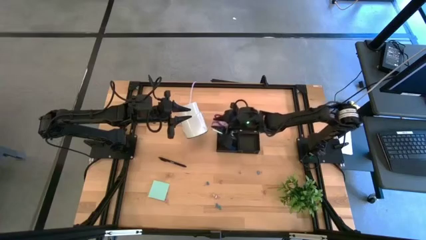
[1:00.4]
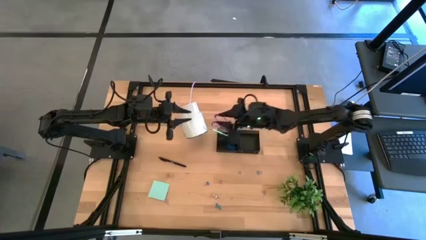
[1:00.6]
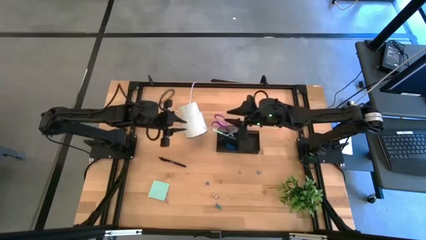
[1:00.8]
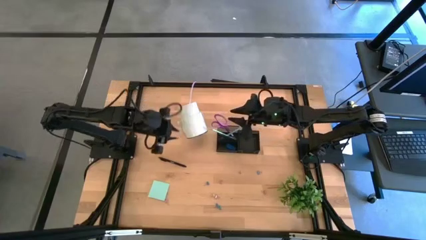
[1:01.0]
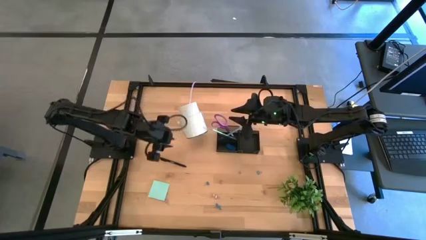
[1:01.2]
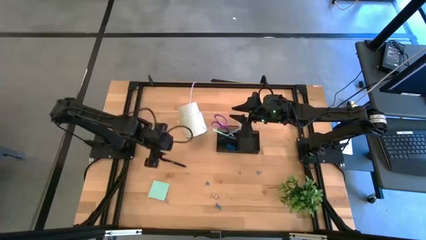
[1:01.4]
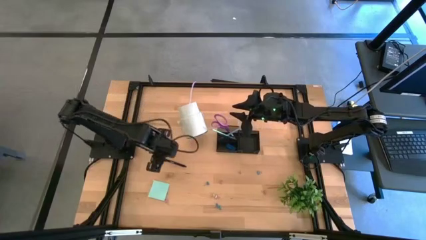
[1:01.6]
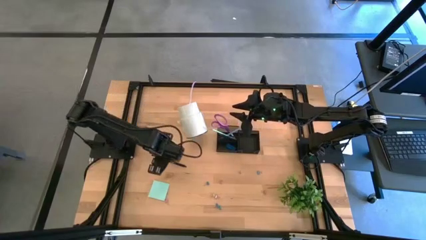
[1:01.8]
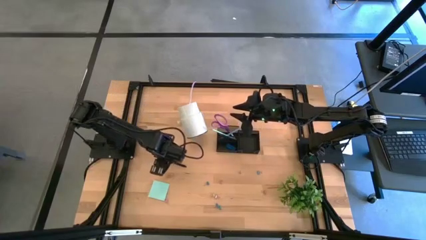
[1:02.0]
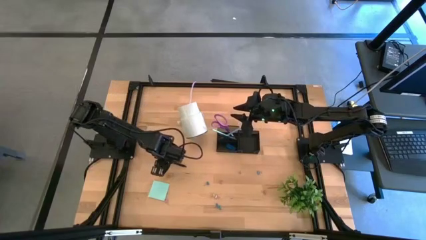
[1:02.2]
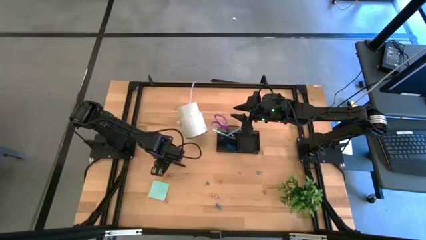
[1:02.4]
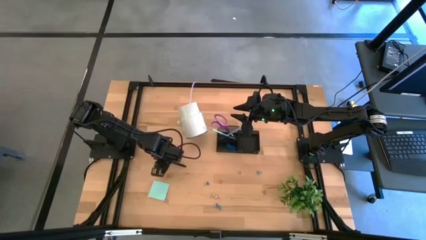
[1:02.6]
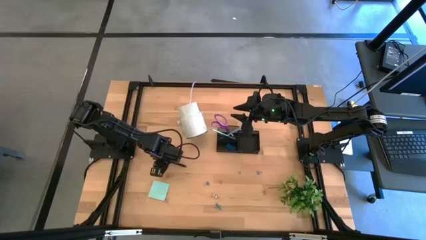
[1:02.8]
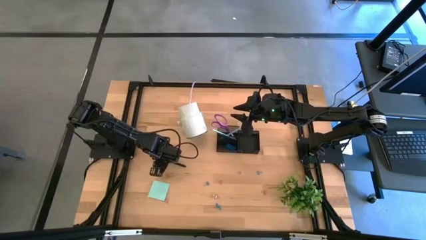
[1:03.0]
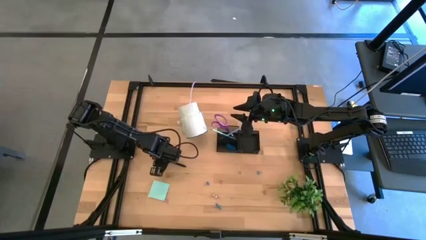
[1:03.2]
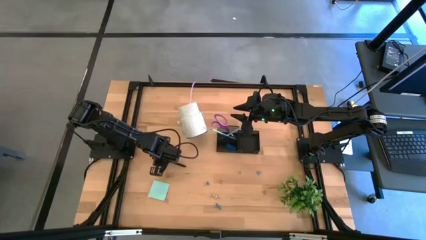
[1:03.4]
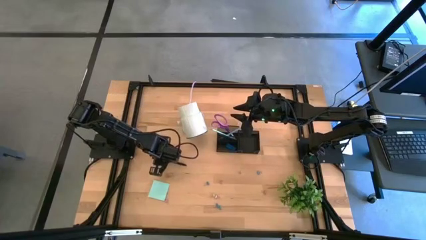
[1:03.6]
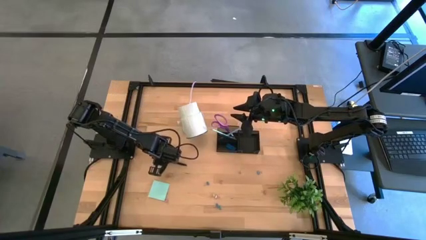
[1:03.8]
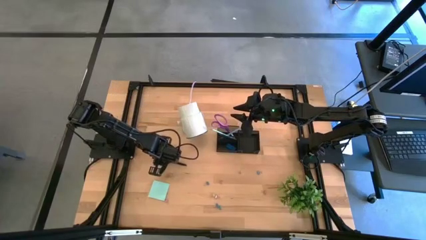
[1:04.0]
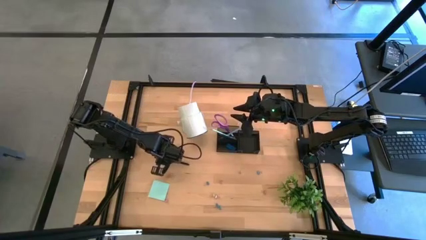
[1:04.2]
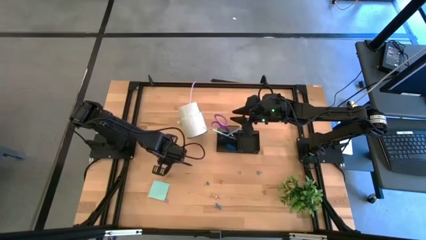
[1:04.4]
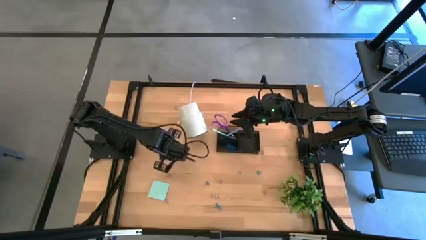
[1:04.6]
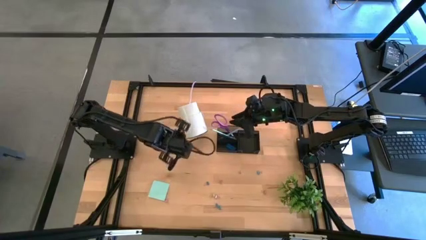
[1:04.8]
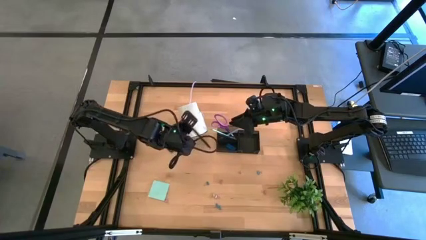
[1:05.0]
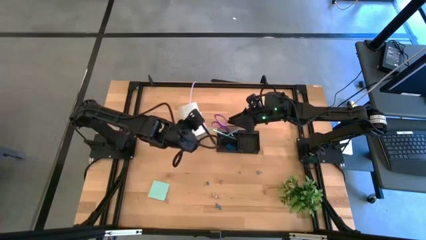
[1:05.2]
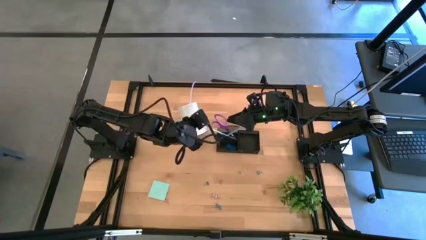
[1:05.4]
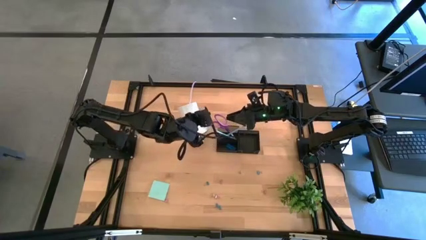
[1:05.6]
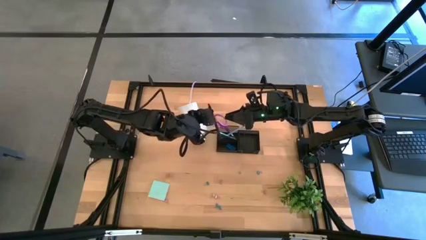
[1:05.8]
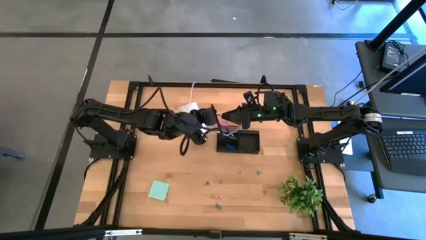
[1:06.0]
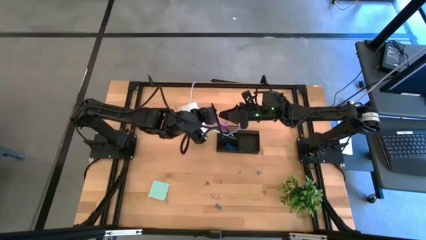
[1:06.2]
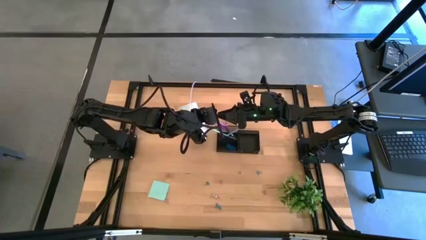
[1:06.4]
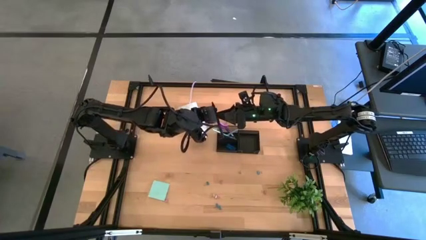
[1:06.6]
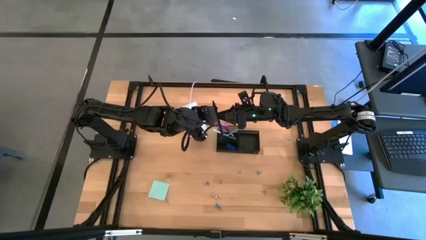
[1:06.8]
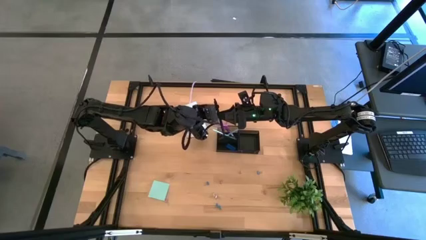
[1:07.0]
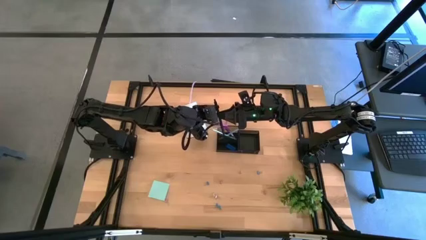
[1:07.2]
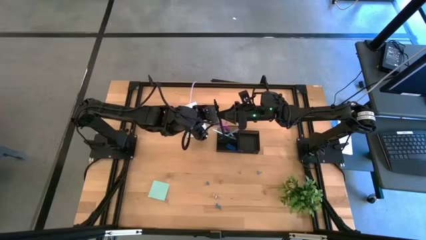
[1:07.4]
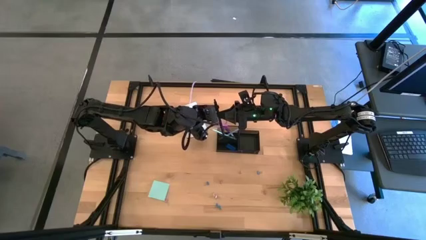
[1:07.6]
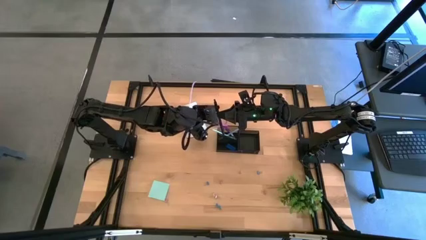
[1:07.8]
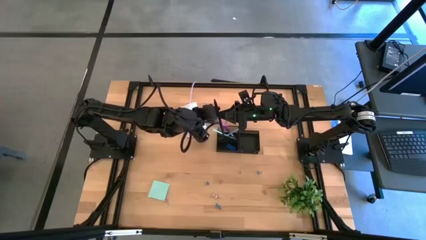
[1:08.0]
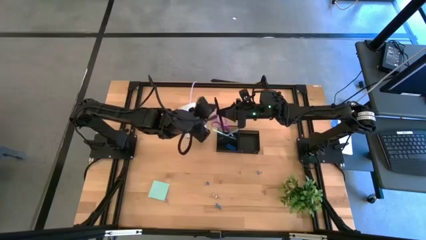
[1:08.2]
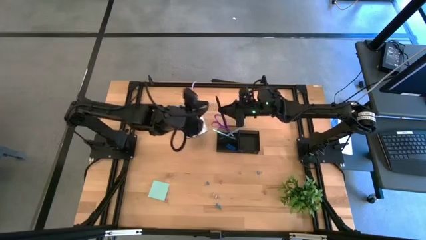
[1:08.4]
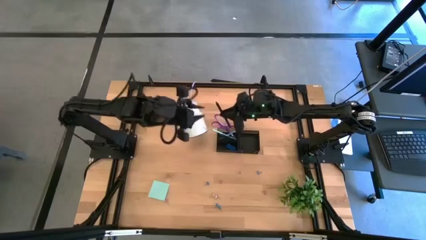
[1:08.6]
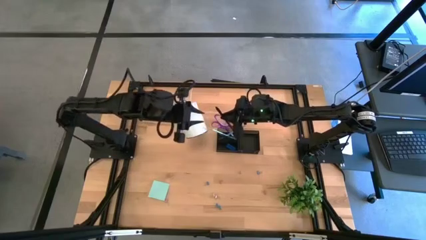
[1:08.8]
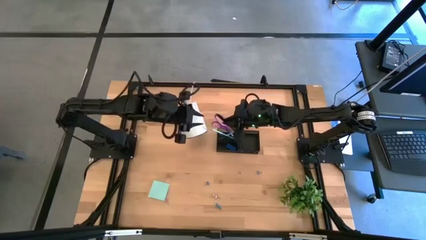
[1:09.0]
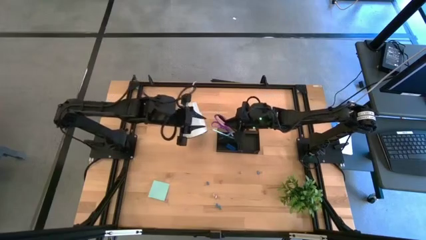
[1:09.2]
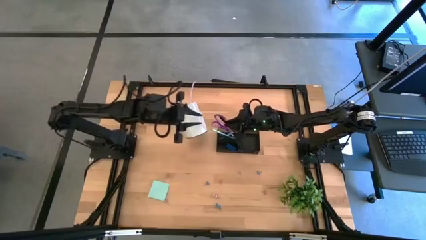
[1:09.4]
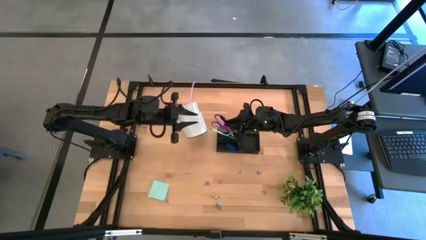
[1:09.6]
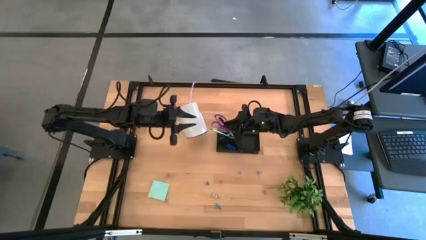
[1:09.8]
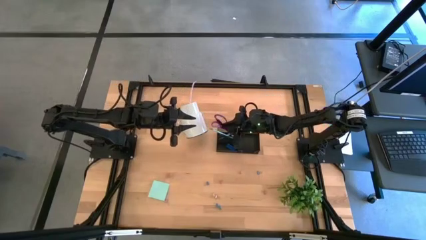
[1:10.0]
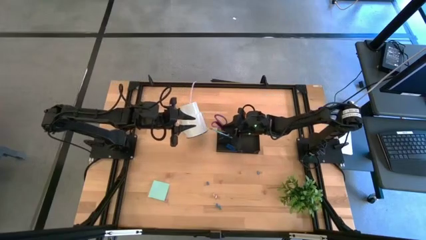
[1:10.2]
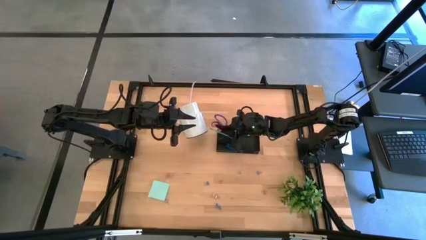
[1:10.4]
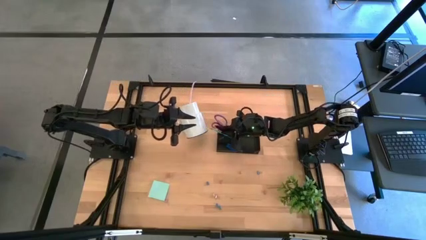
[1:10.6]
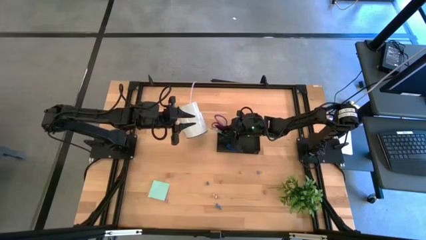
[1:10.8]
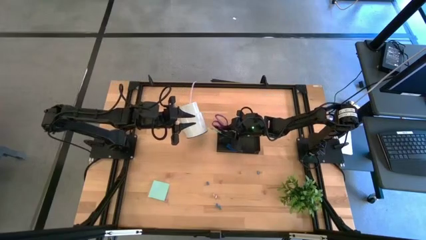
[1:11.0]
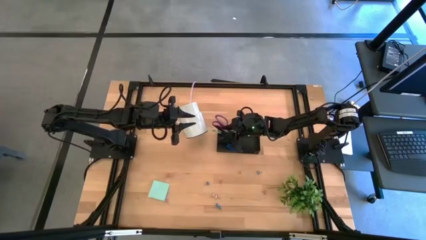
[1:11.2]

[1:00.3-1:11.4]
Task: Pick and place office supplies into organizer
Put the black pen into the black desk organizer

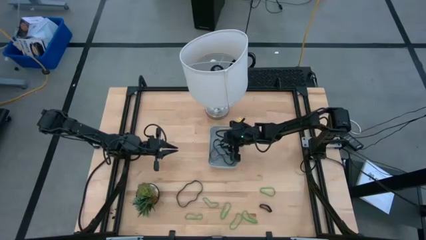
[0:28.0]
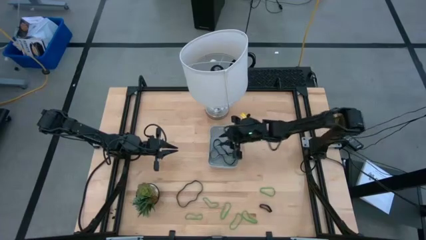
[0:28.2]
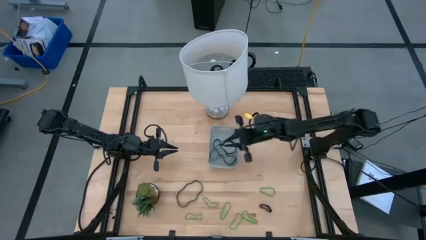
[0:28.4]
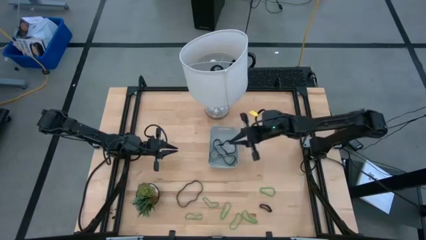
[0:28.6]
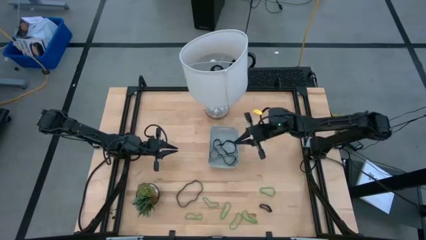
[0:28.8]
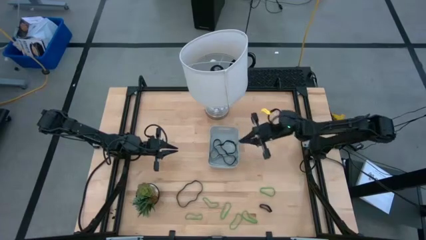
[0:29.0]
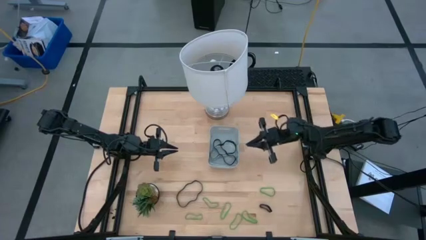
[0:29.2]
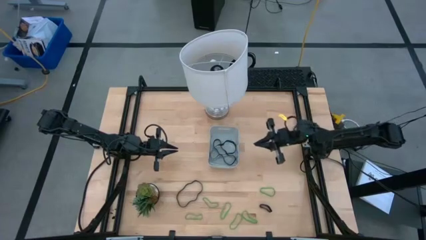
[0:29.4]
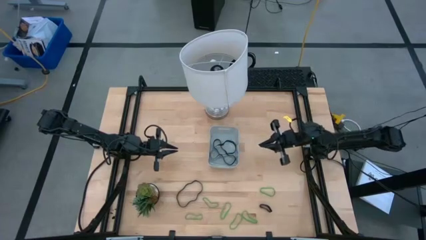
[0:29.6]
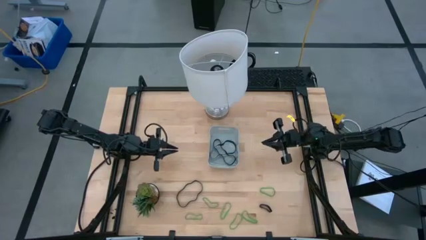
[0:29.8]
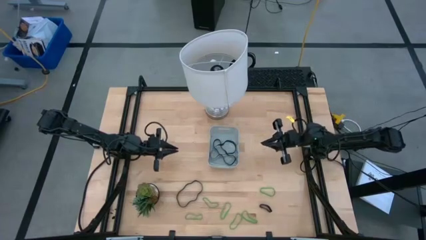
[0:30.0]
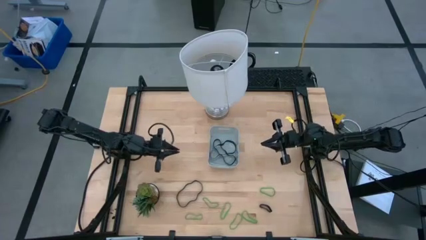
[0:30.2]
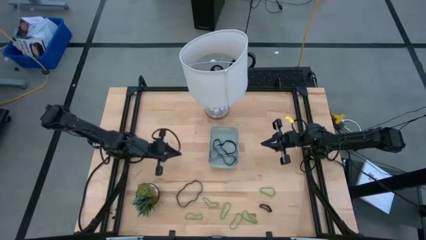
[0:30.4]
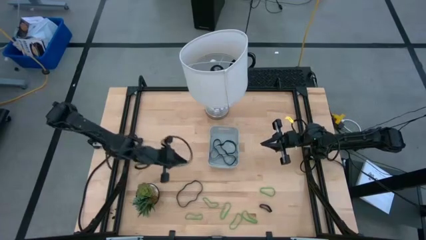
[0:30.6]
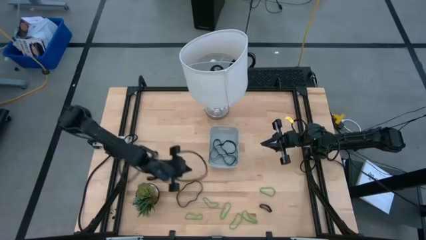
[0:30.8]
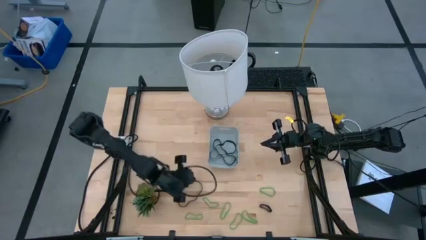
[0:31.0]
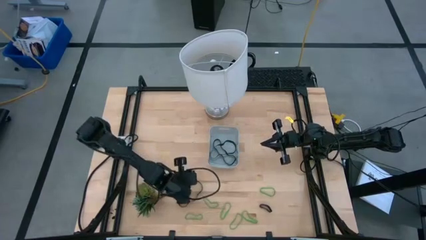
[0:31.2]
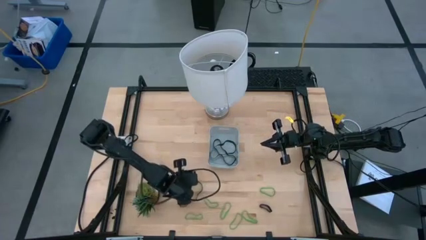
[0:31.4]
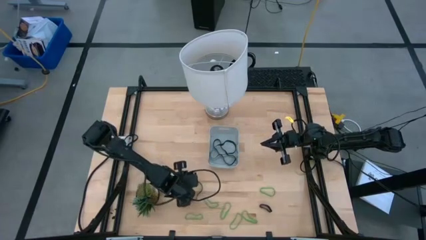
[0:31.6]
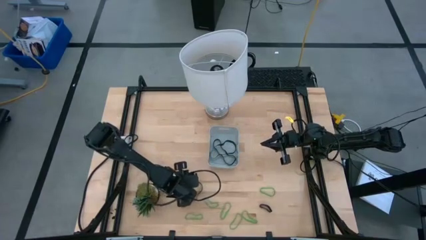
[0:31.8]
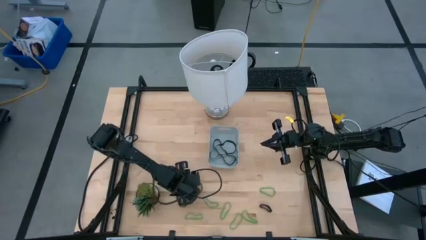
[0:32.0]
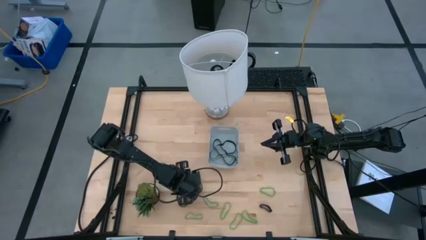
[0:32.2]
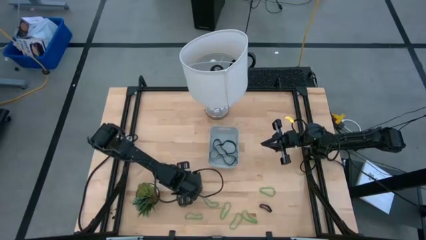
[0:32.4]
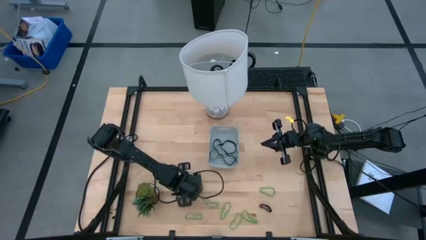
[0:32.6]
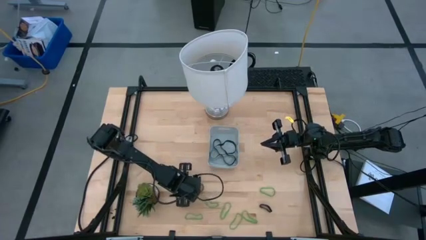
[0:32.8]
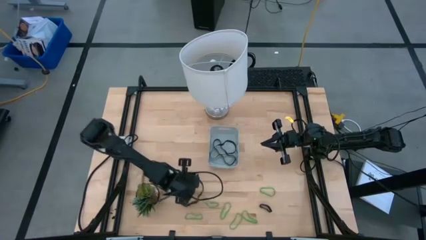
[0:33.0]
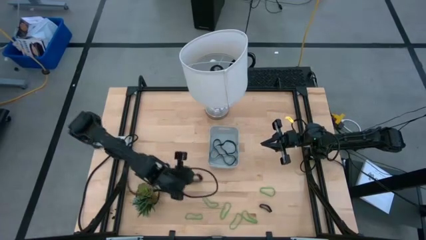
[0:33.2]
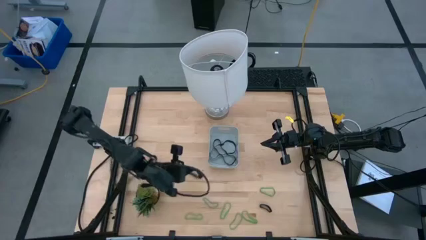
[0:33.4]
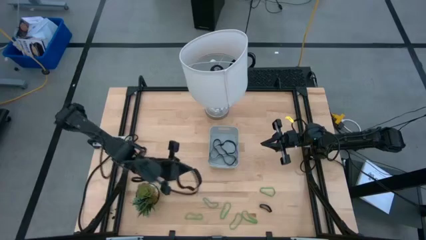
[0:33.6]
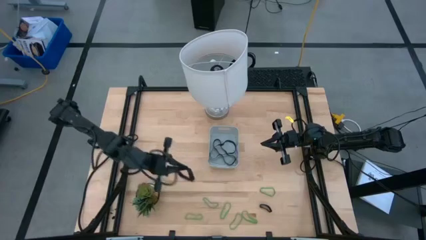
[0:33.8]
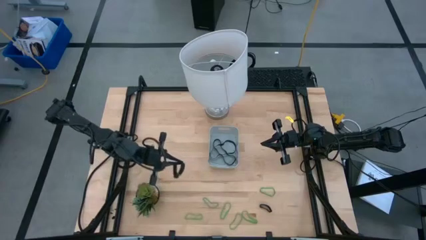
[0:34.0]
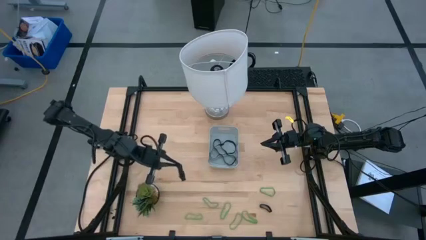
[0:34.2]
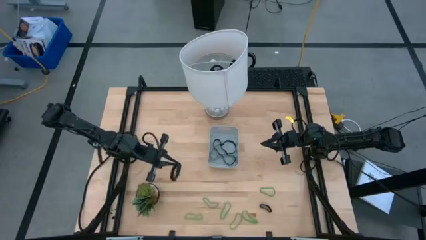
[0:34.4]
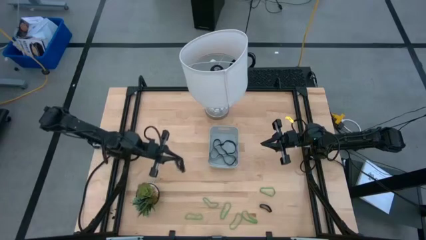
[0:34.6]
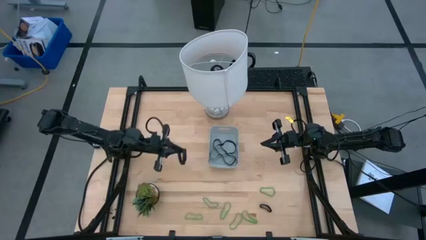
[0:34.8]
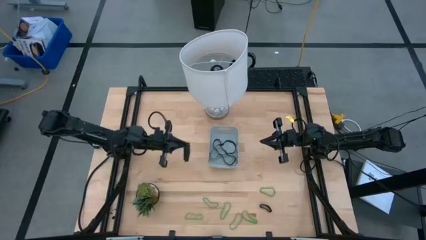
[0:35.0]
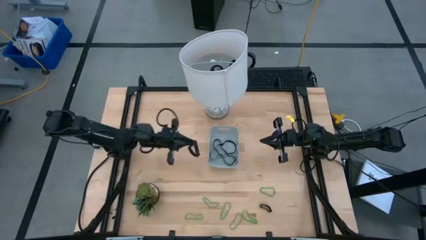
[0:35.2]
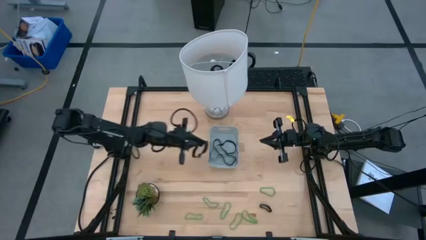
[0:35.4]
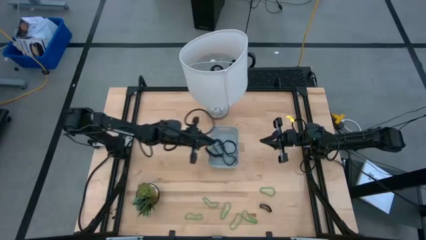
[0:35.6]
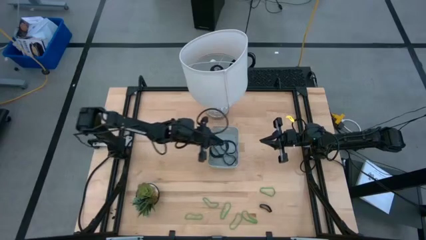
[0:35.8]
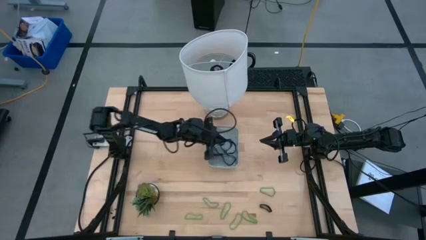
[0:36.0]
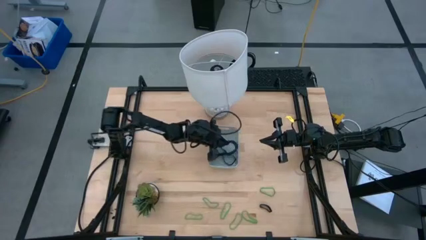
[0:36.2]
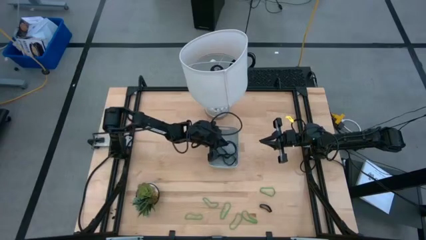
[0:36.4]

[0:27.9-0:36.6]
Task: Pick and place rubber bands into bin
Put the black rubber band into the gray bin
